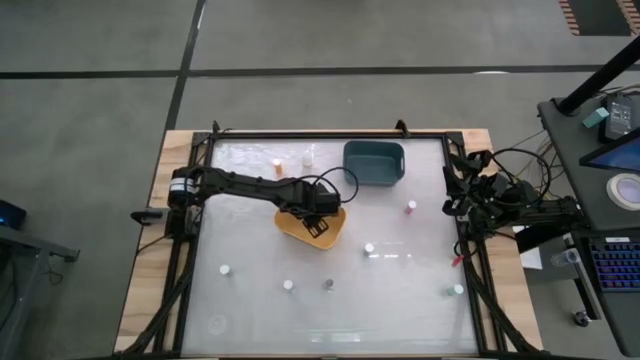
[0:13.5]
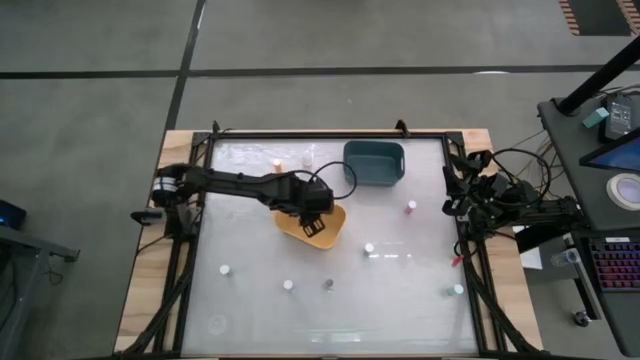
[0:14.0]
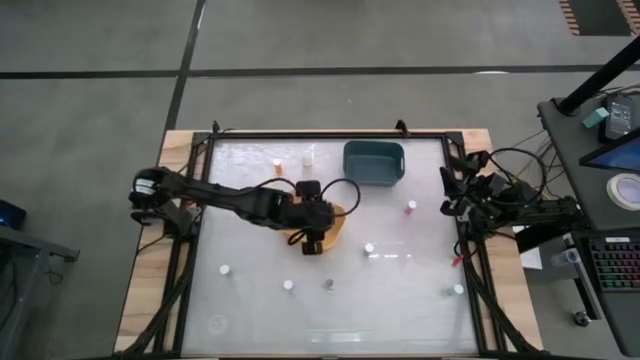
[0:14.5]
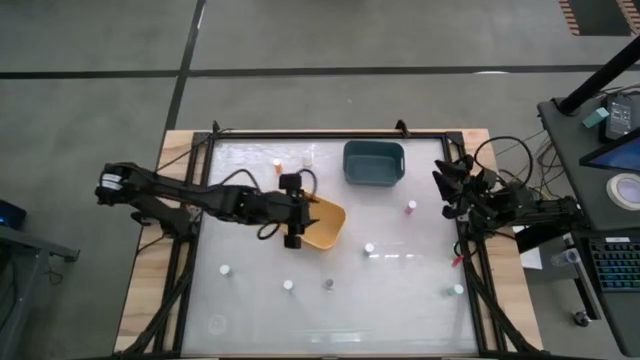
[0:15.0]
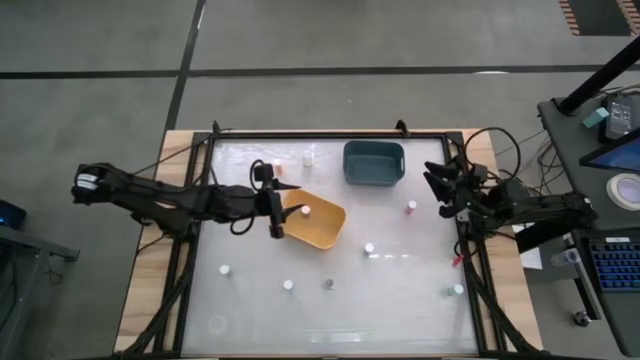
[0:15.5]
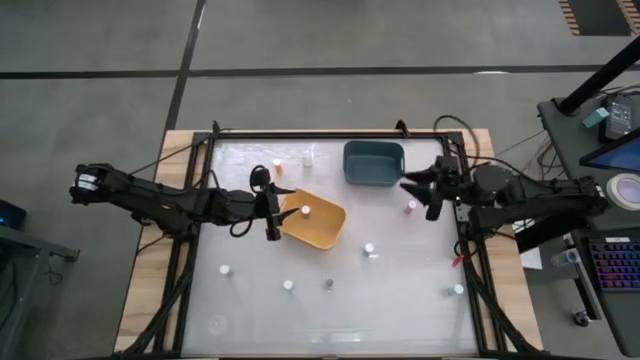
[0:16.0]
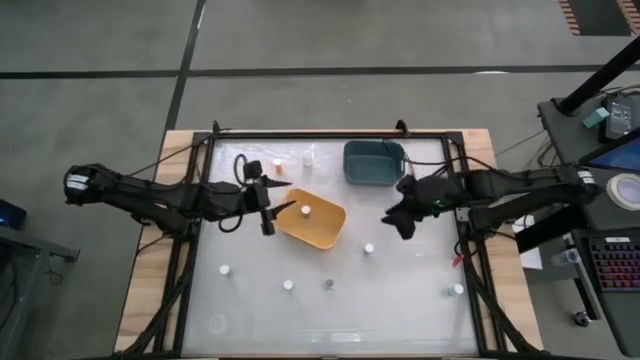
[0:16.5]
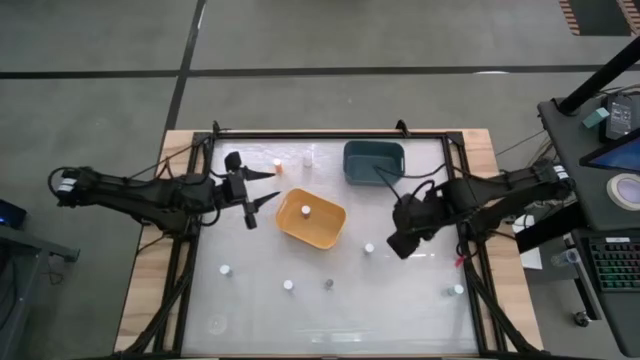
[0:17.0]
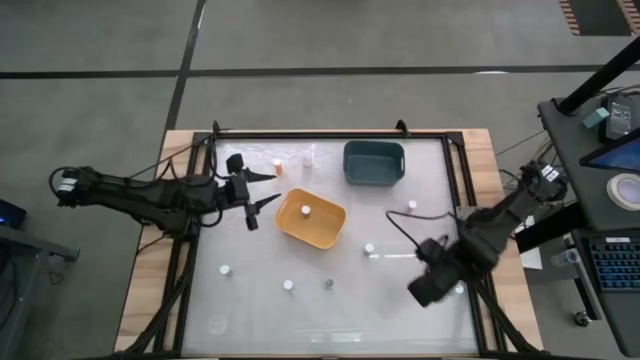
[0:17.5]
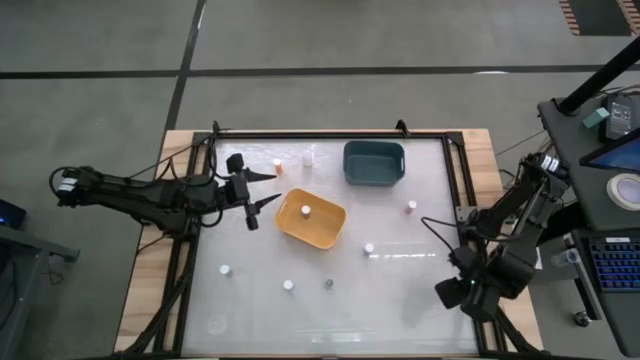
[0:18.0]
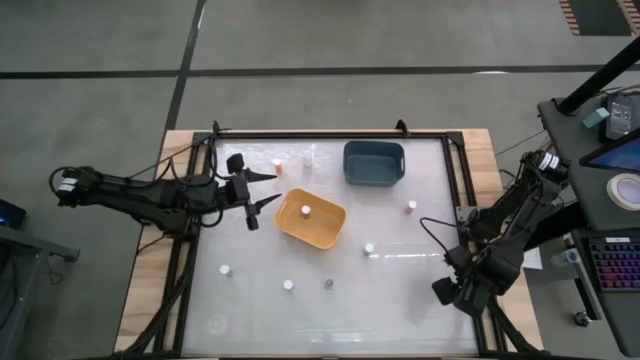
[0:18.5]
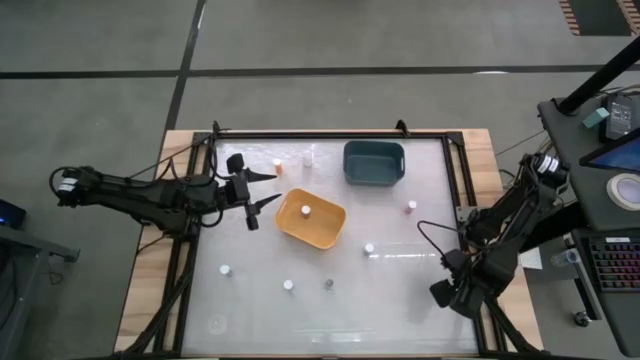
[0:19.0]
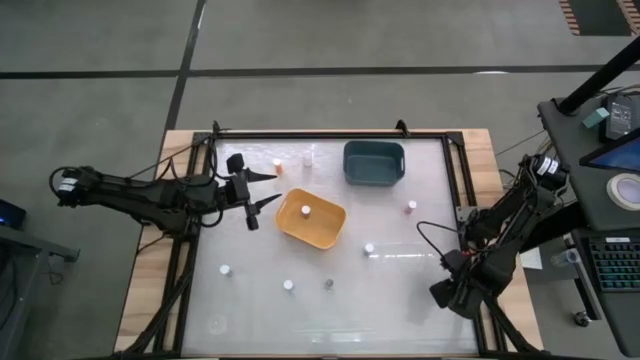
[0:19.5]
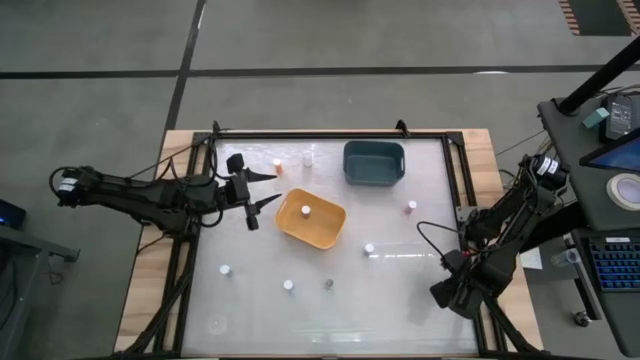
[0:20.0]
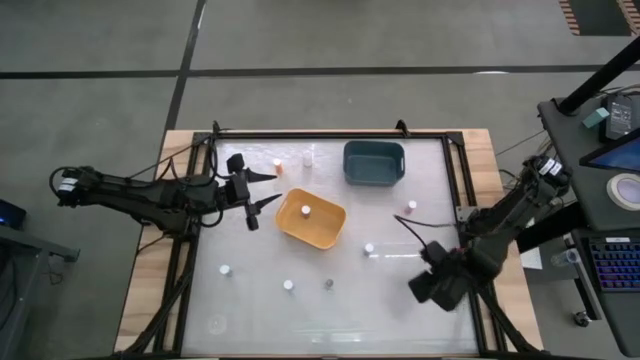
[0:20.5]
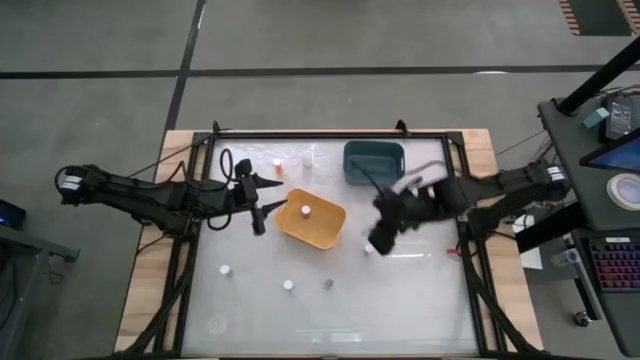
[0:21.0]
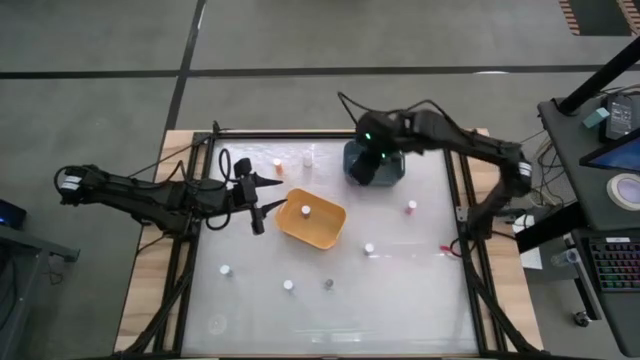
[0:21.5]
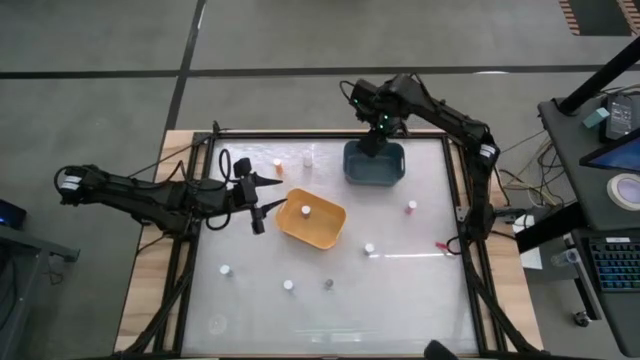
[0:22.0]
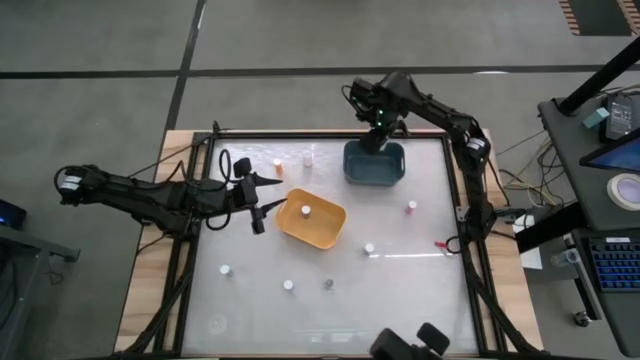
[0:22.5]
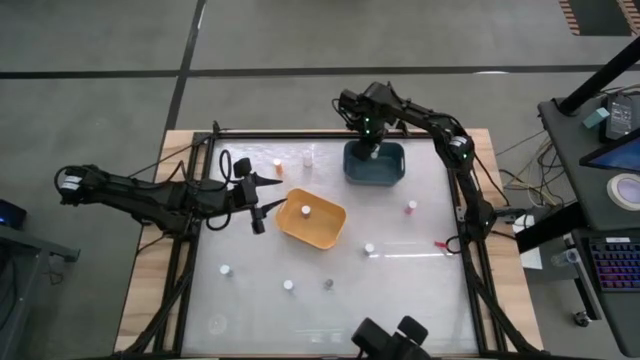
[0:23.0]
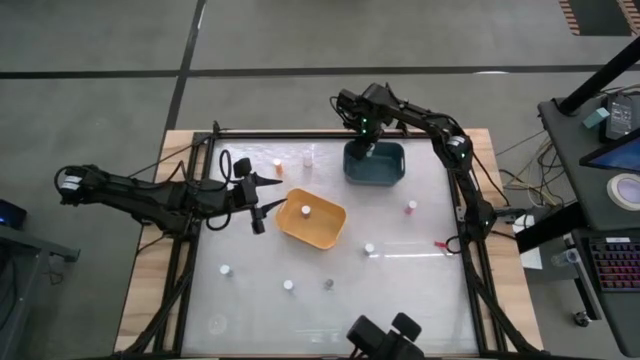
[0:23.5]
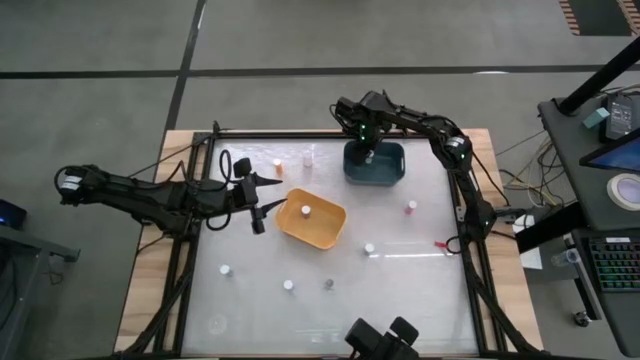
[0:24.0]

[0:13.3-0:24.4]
Task: Pick and place medicine bottles into bin by pill shape (circle, oval)
Put the blue pill bottle into the blue bin

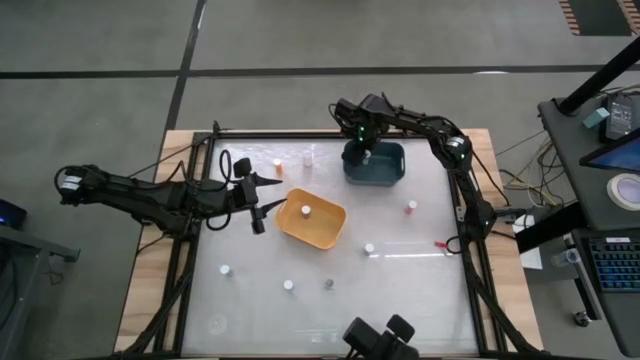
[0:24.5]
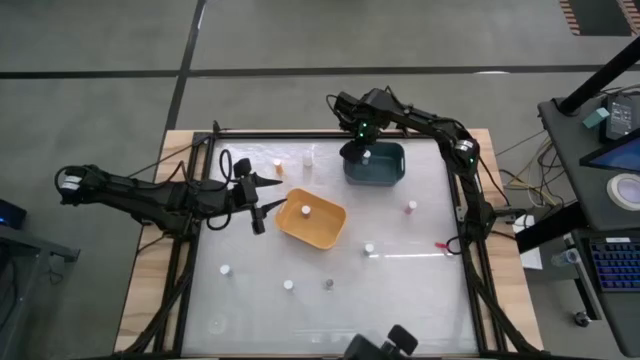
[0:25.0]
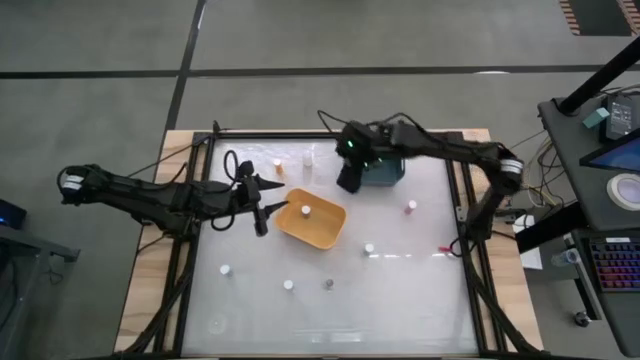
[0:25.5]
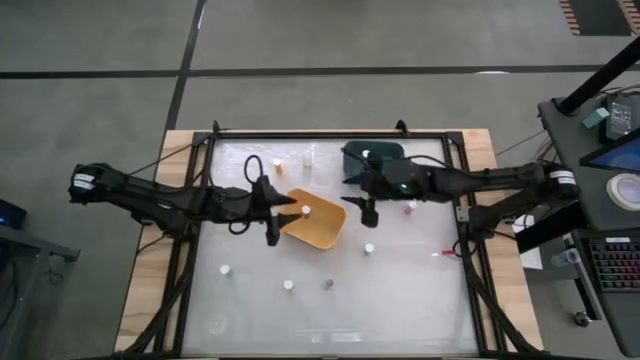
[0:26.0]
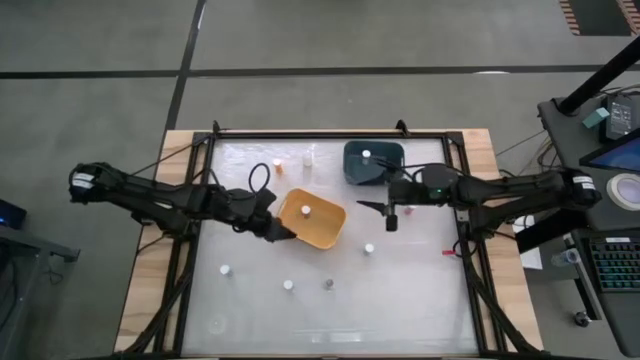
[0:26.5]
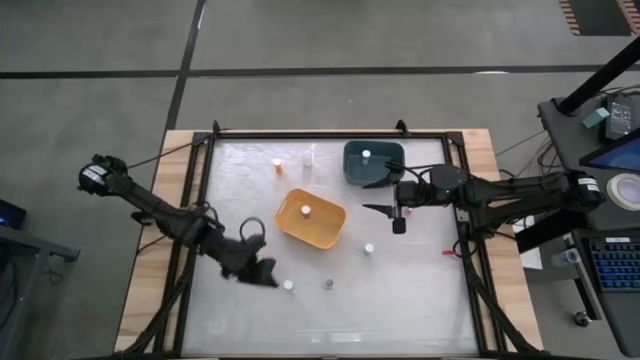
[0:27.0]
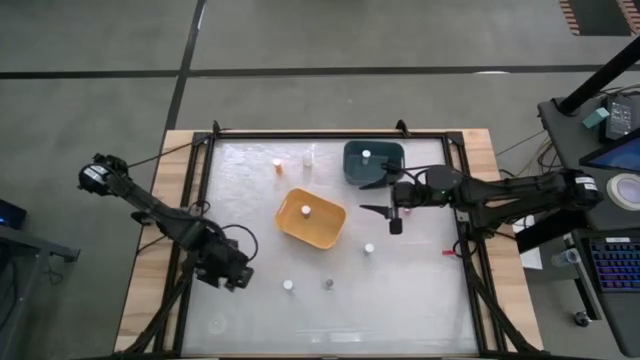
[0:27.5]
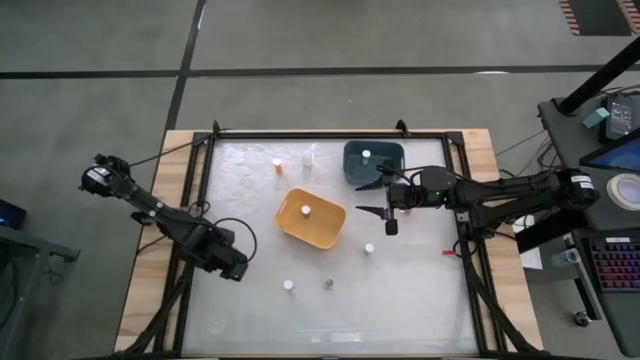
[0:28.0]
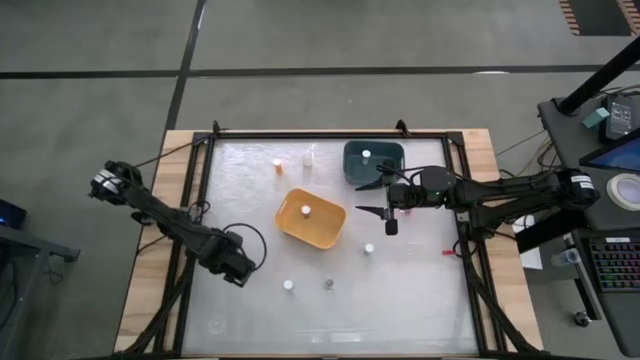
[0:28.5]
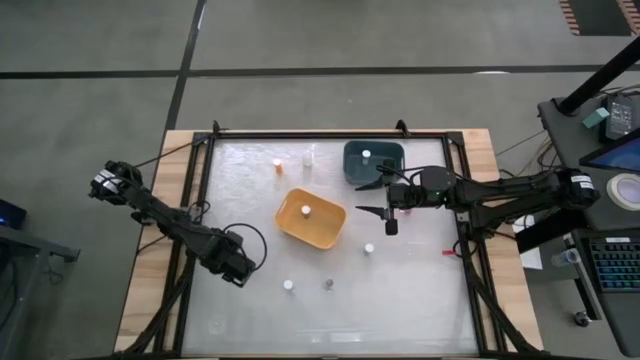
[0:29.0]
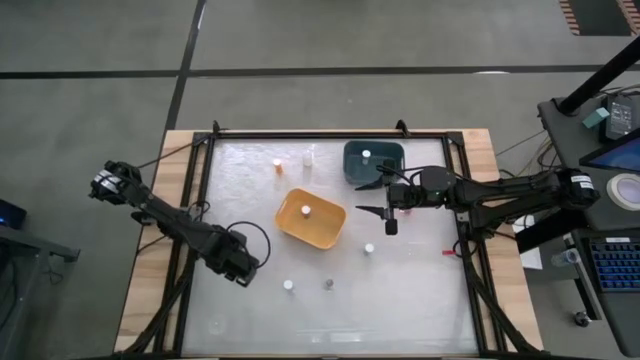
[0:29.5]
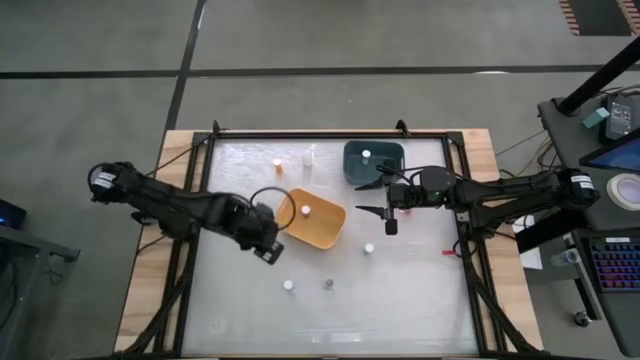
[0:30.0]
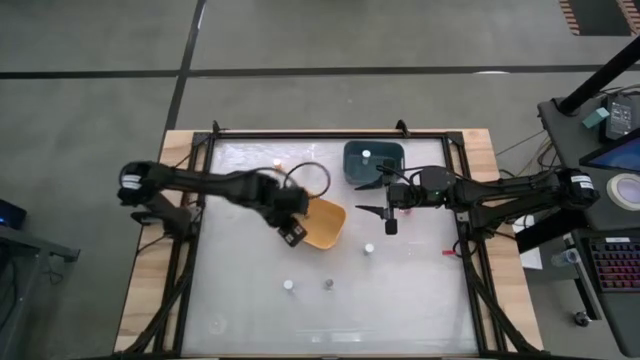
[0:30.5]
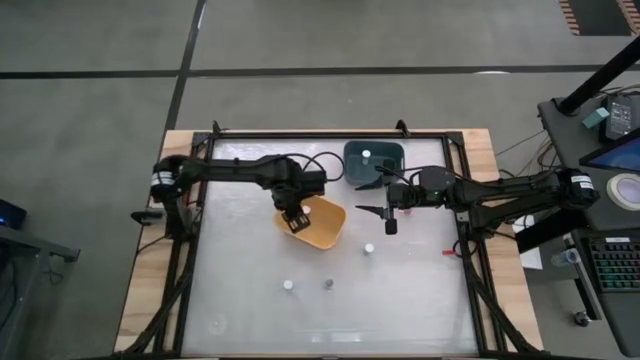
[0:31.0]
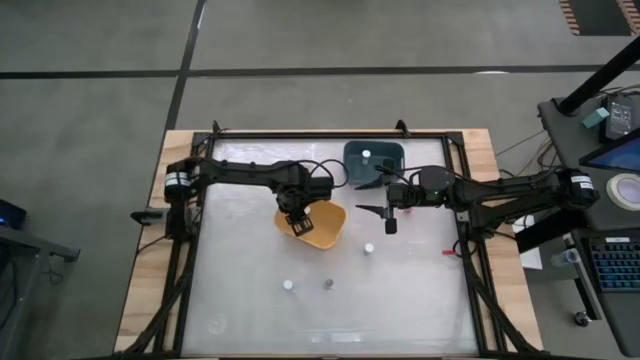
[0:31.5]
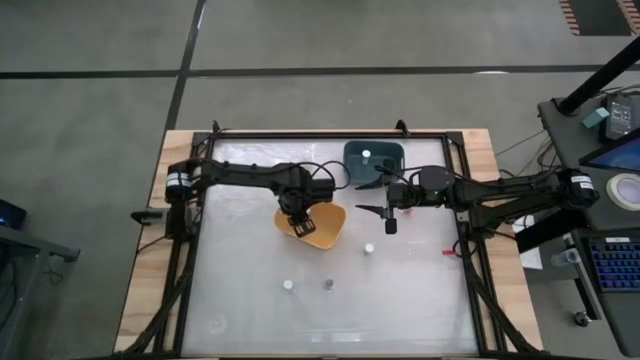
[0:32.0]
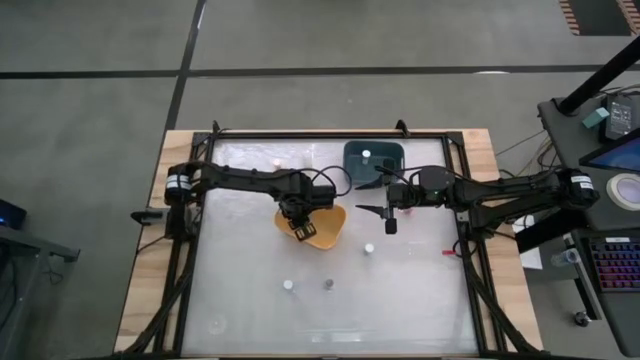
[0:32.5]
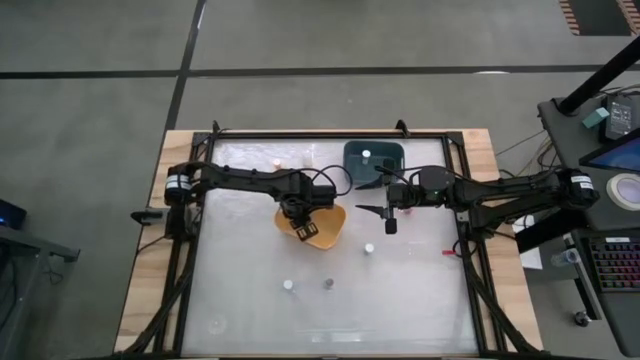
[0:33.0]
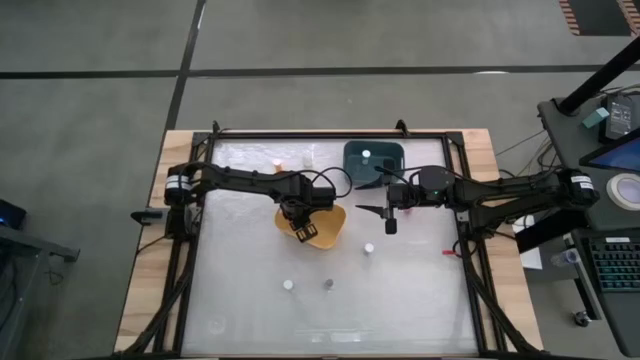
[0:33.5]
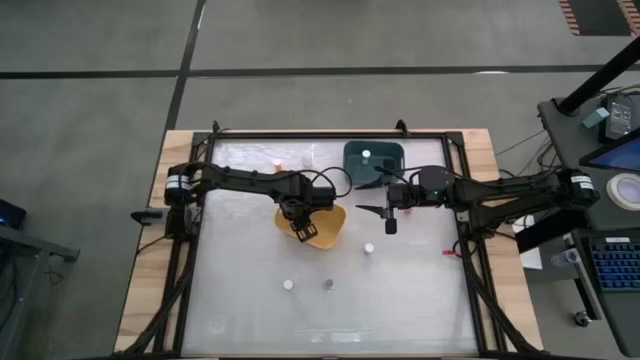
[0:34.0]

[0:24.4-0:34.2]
Put the blue pill bottle into the yellow bin

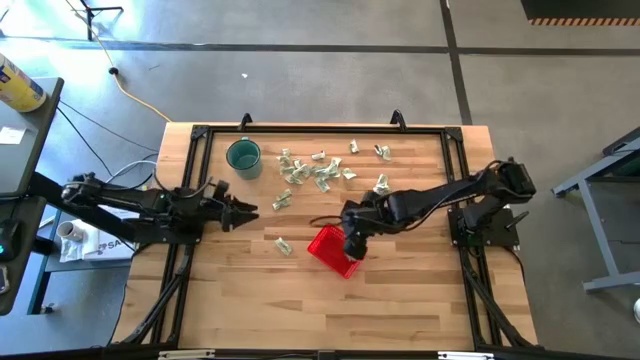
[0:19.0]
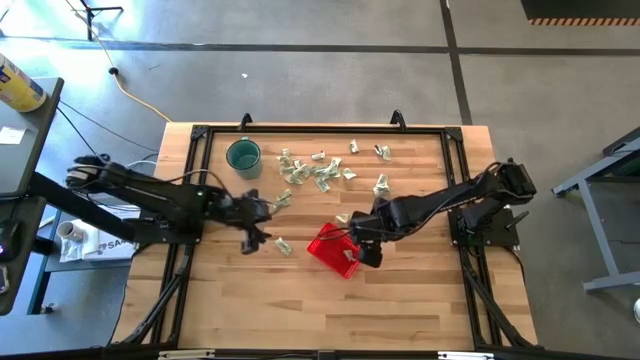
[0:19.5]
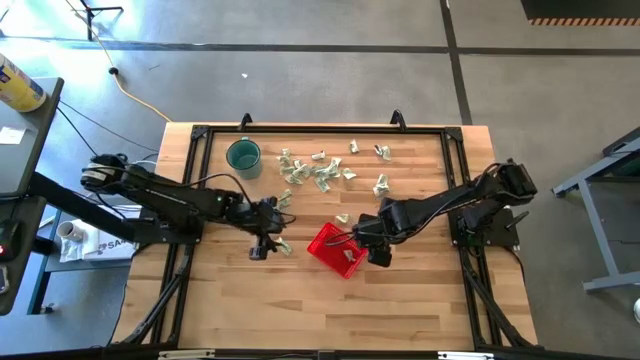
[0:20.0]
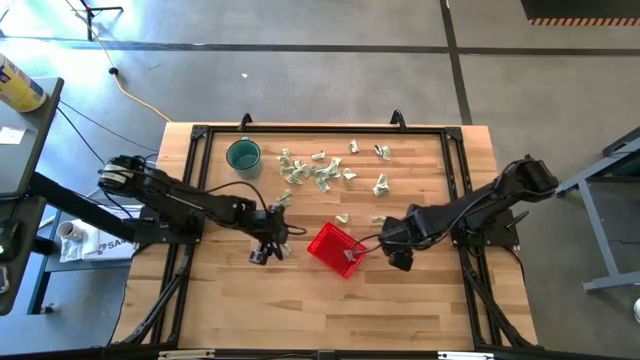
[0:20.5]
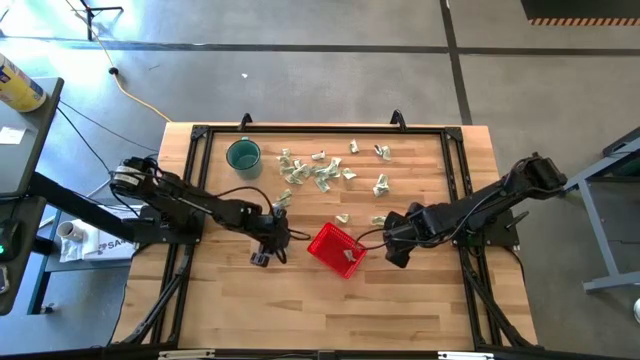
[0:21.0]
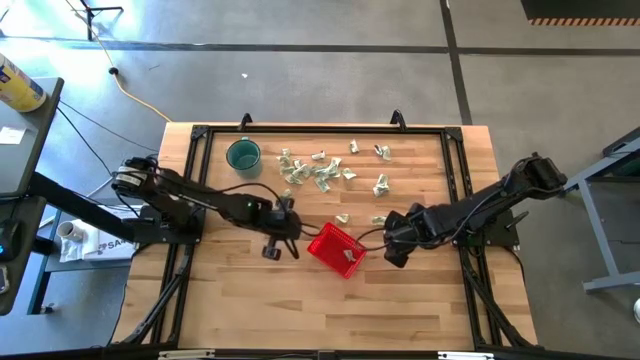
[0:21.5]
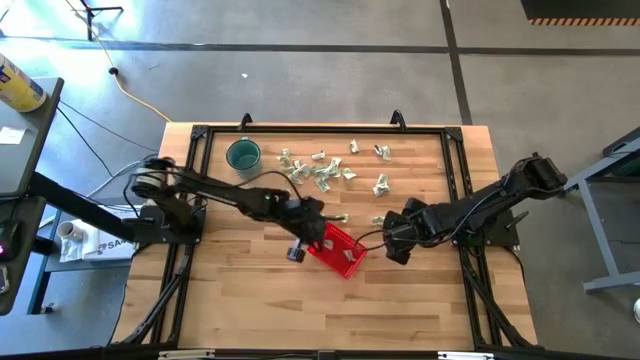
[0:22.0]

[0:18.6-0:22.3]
Task: Pick and place Stevia / Truvia into bins
Put the light green stevia packet into the bin
